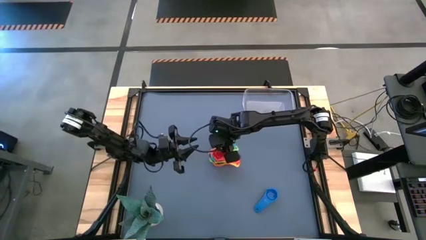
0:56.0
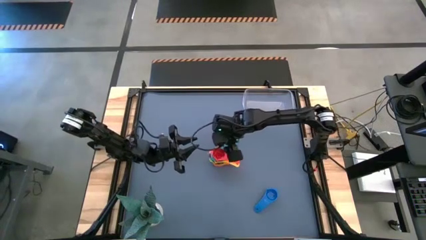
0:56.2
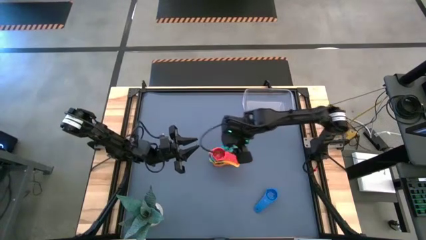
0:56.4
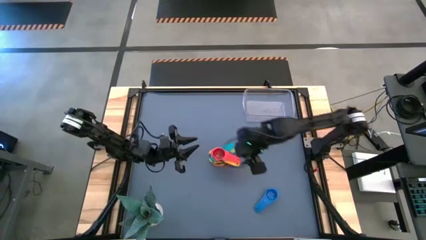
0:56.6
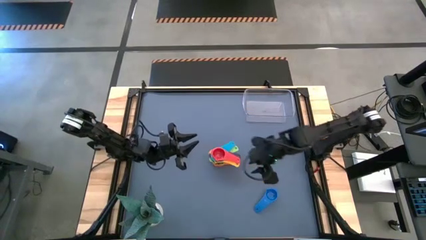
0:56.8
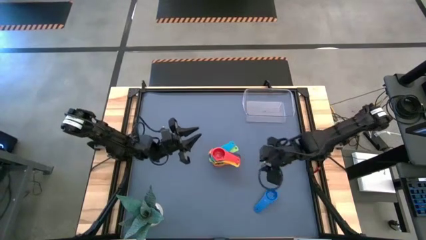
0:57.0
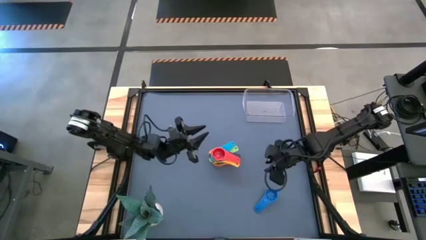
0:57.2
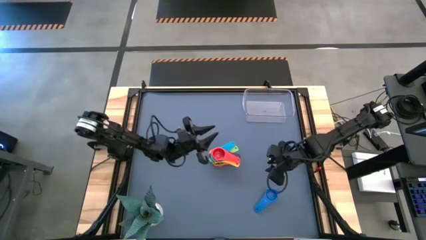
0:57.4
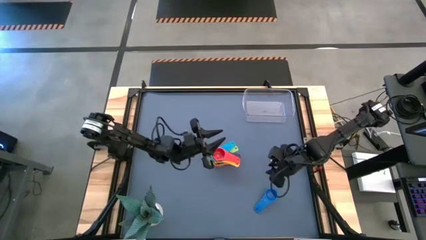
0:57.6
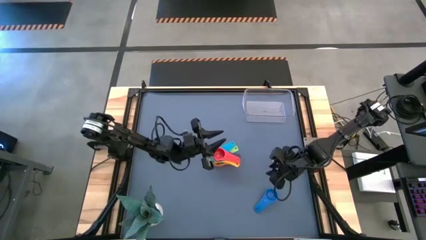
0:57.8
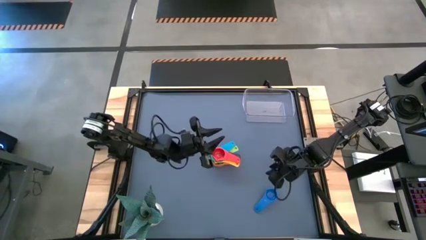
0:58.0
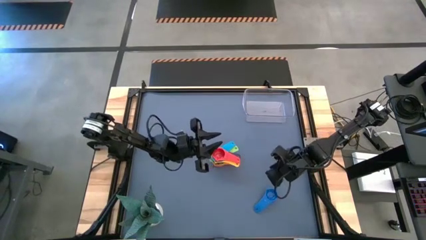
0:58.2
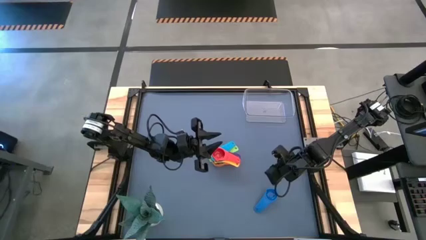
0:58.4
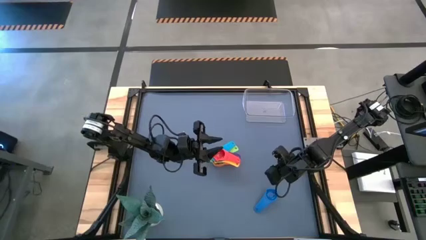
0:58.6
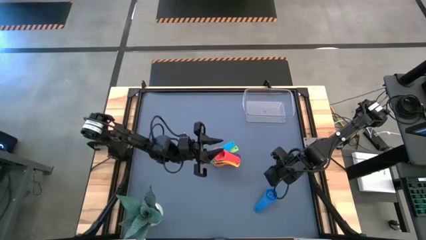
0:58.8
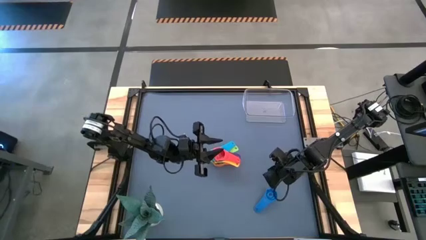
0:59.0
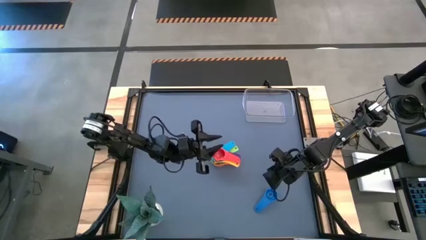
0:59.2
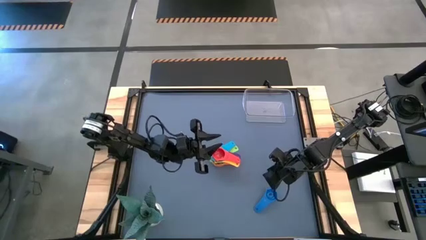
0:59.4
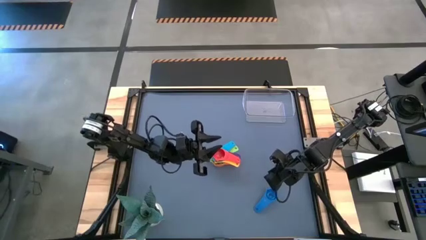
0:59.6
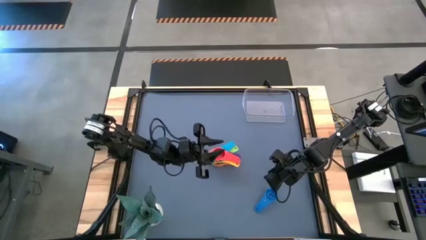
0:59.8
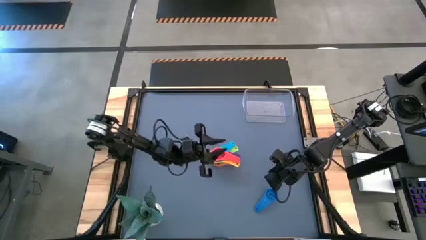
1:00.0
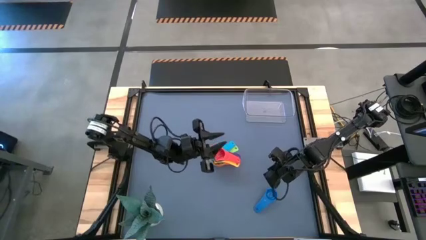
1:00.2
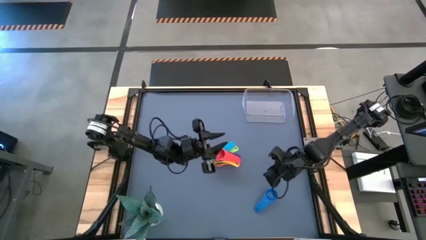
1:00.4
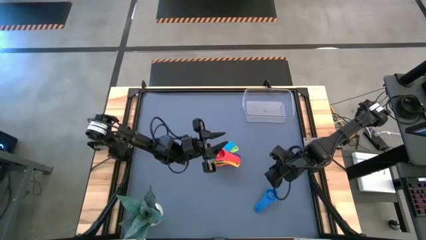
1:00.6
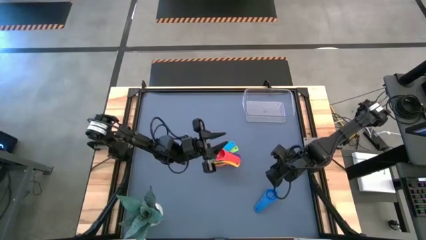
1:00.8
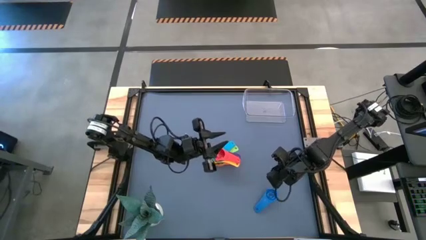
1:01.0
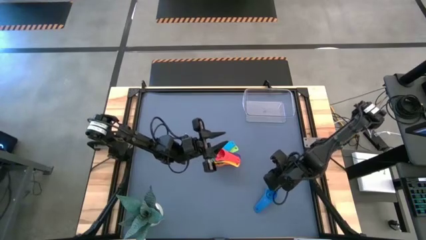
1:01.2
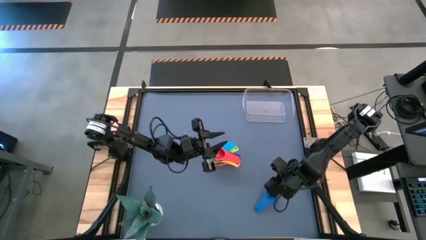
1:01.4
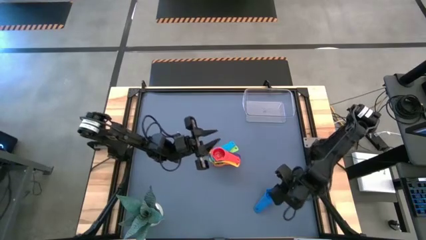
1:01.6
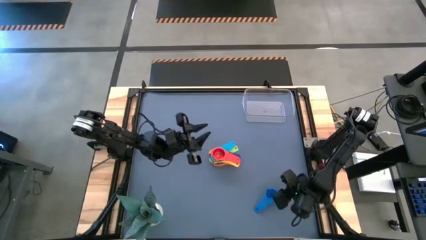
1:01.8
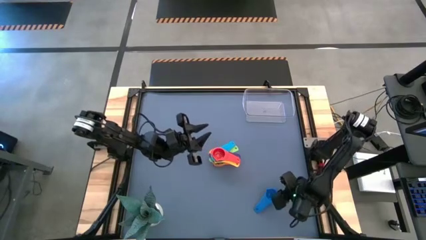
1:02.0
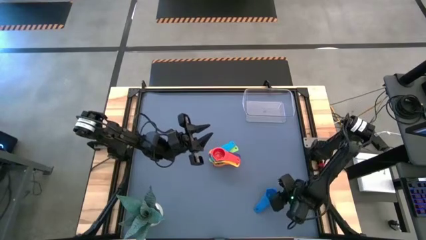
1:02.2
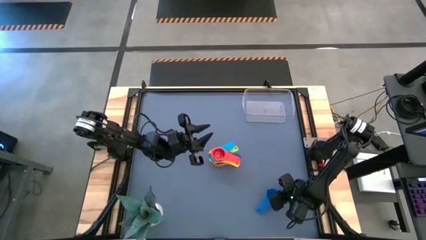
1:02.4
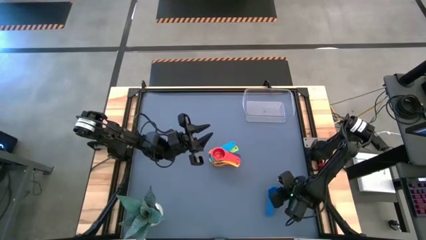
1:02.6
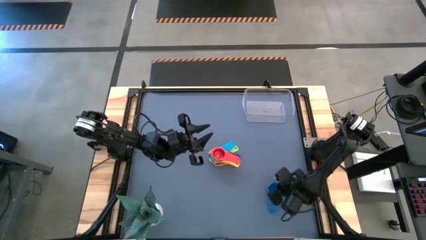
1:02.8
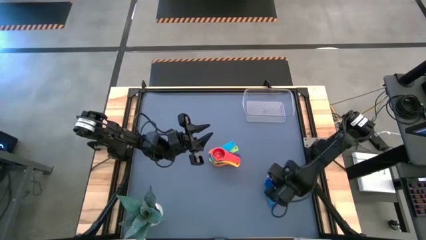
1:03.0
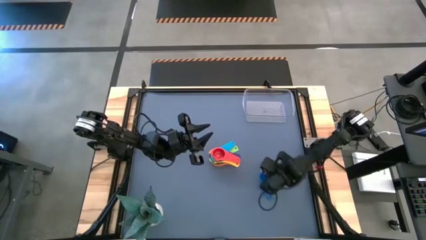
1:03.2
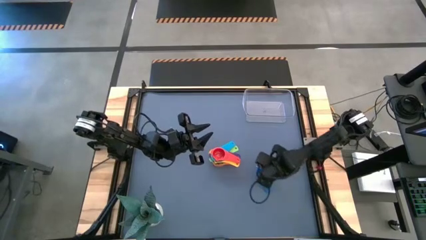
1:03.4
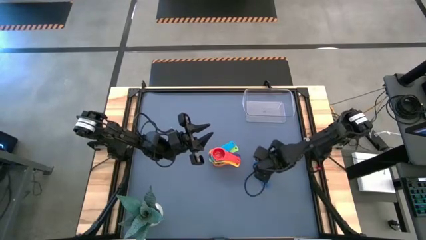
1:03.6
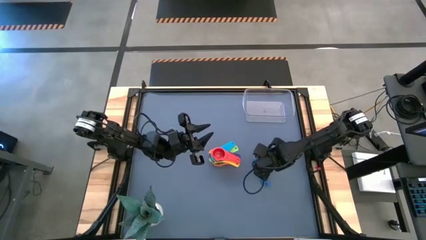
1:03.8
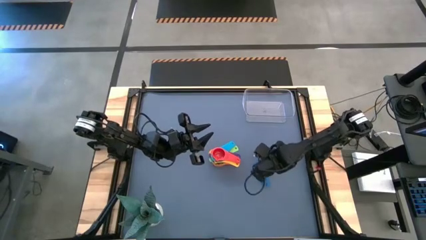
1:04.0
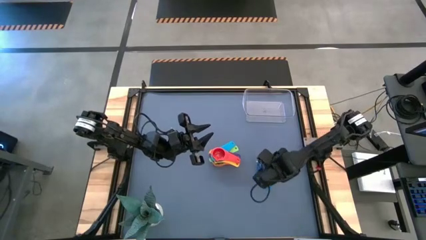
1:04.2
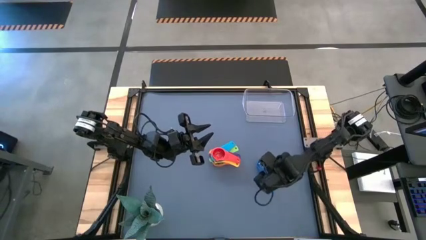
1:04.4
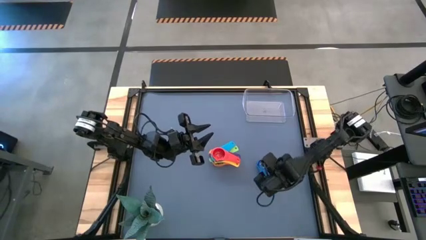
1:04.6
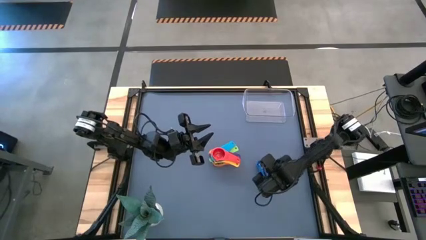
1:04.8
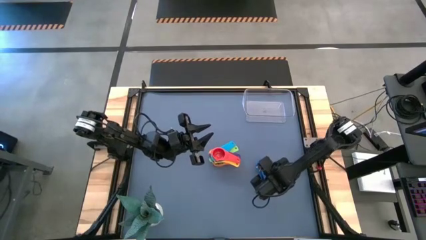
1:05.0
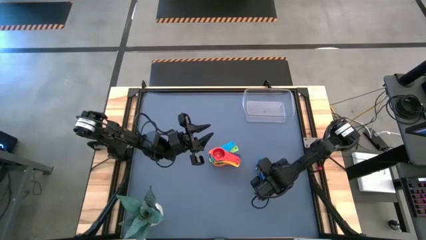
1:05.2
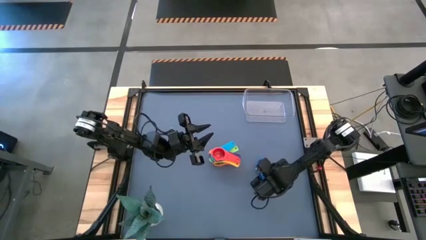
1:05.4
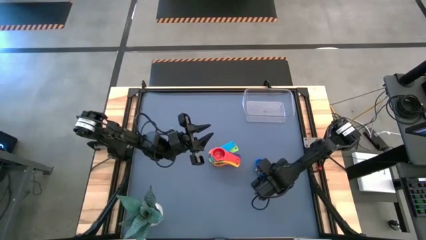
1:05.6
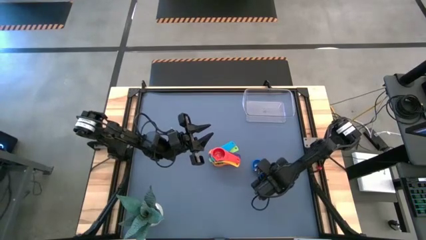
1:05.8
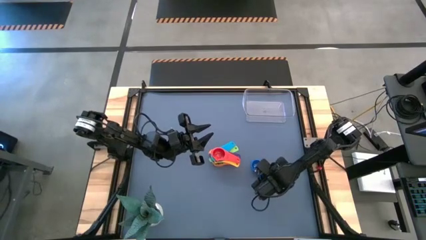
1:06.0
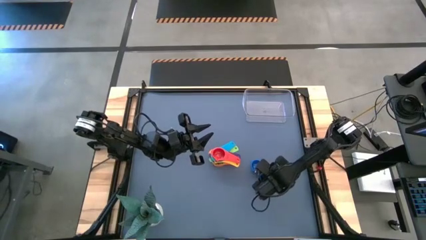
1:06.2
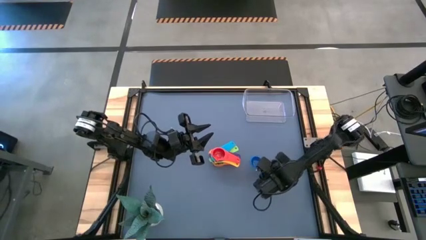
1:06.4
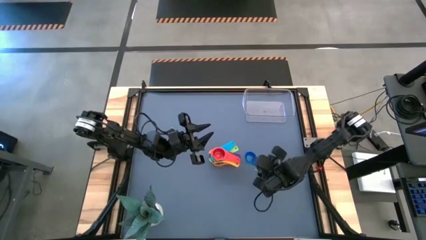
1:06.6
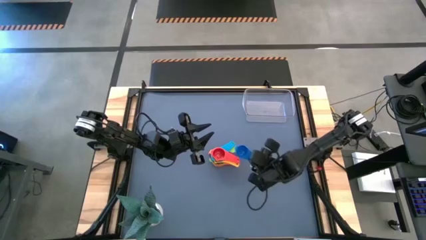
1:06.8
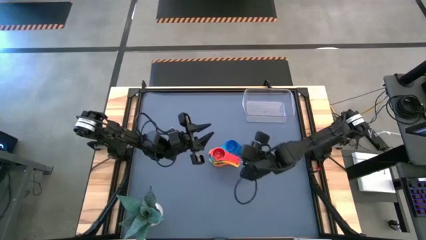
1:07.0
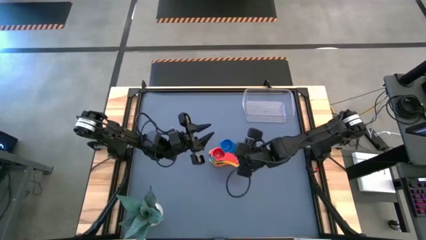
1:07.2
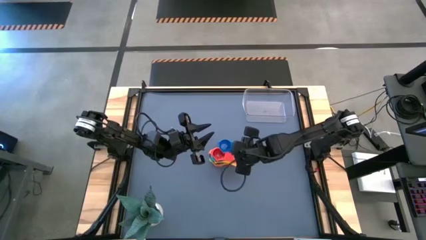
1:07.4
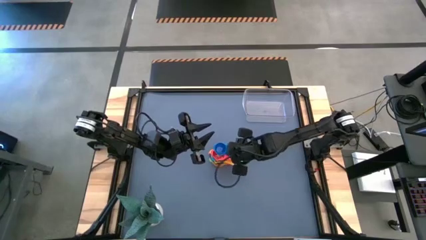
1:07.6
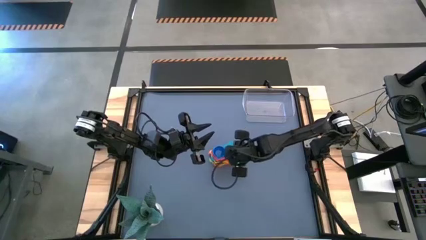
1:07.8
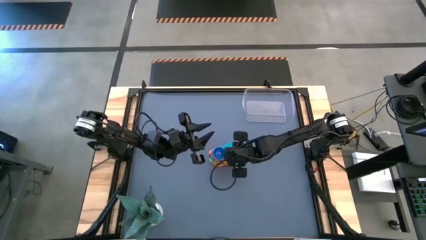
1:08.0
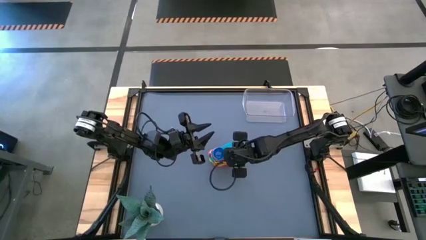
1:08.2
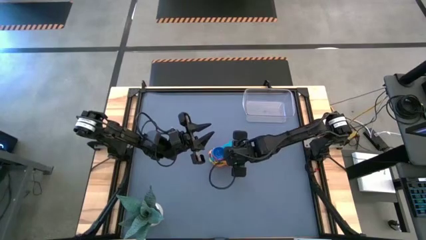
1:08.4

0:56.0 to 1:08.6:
Task: Nest measuring cups in basket
Stack the blue measuring cup on top of the red measuring cup

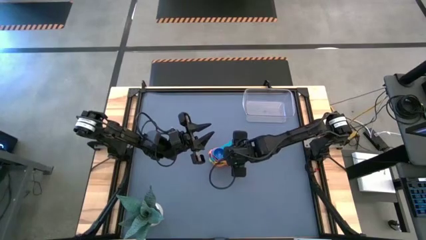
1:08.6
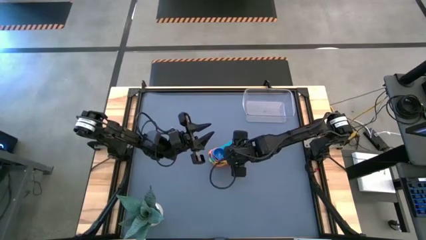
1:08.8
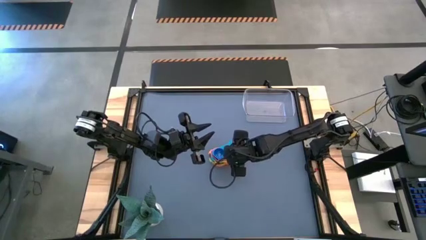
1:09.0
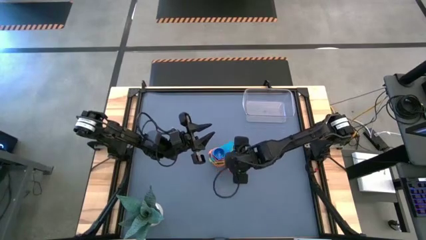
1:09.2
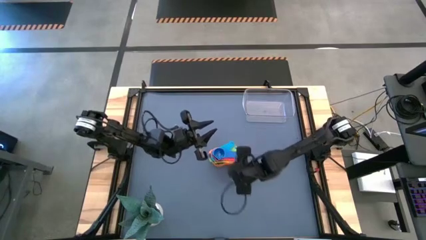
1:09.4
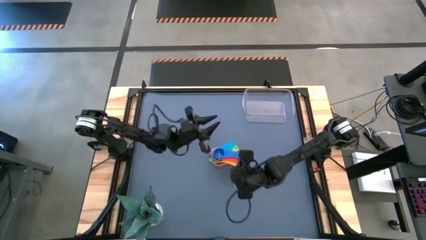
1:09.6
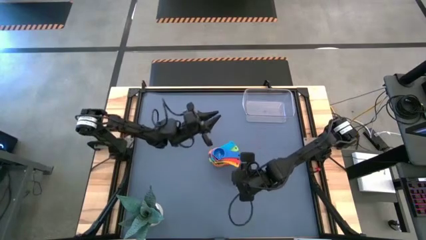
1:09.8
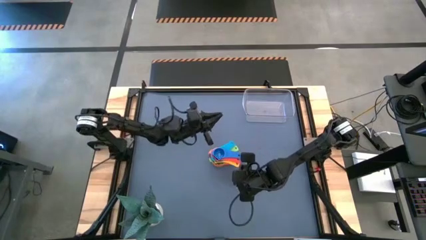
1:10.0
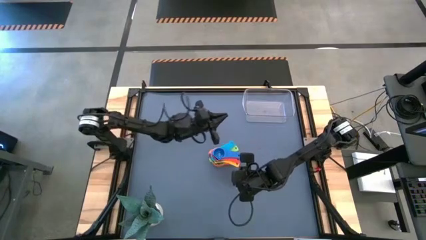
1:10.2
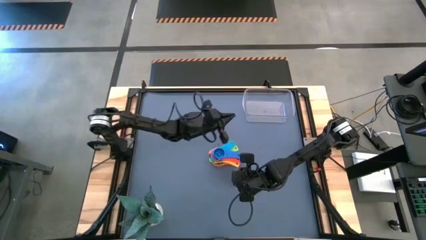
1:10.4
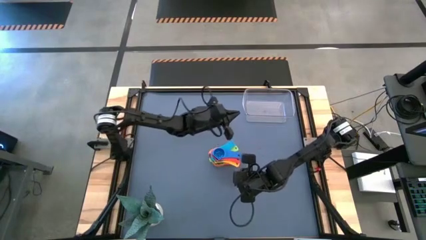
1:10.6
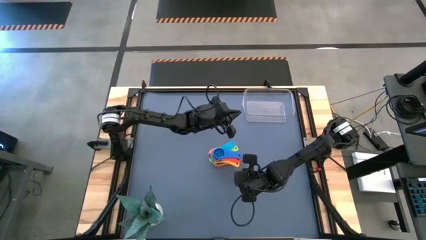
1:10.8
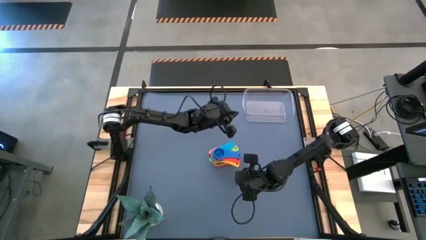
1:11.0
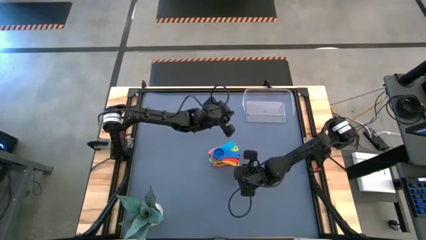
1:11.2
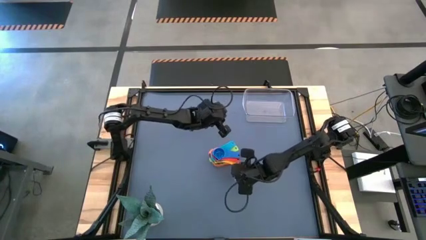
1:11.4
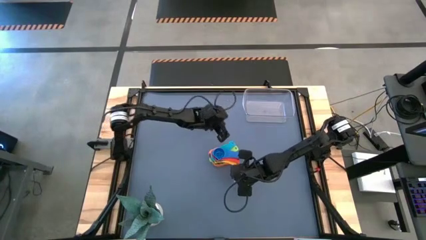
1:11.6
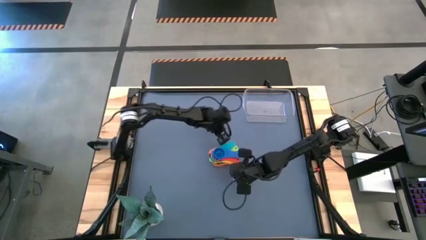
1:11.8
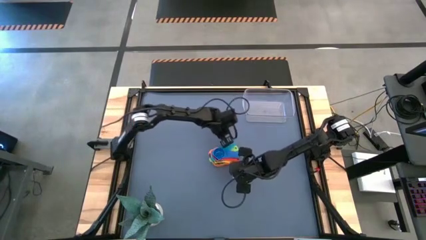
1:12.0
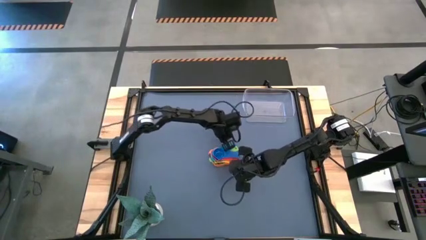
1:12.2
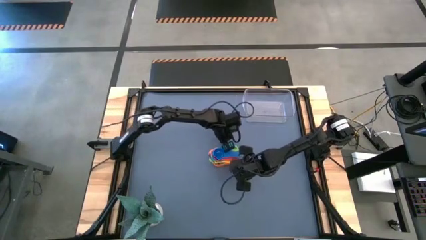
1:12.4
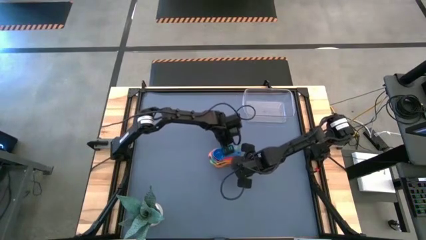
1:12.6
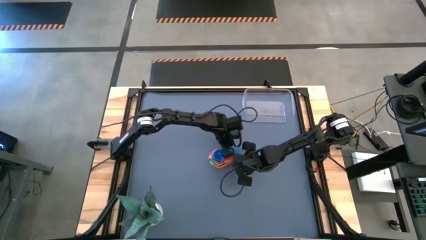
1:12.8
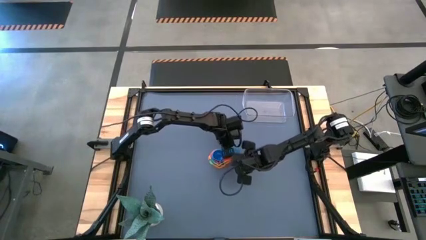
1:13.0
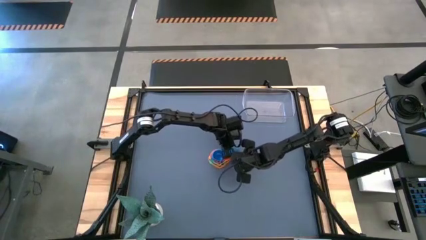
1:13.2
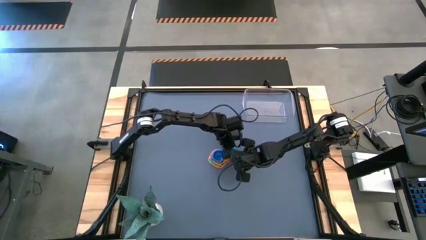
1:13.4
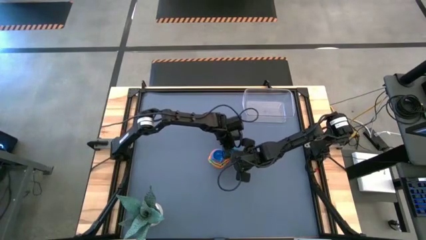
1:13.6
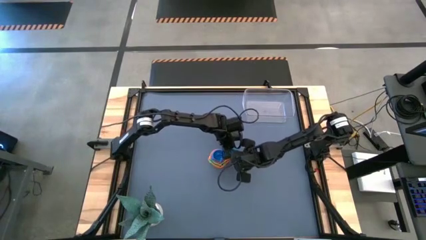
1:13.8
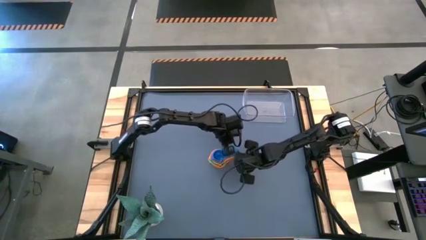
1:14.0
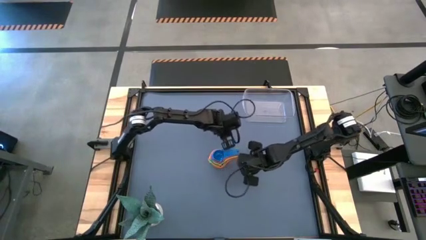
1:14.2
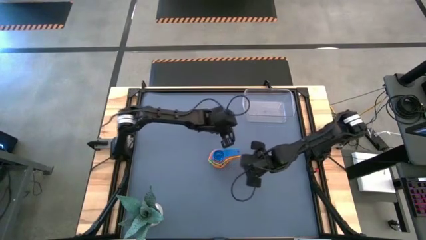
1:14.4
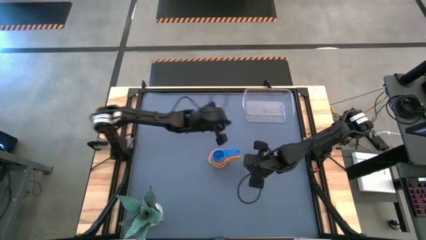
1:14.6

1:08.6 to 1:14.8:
Adjust the measuring cups to fix it neatly
